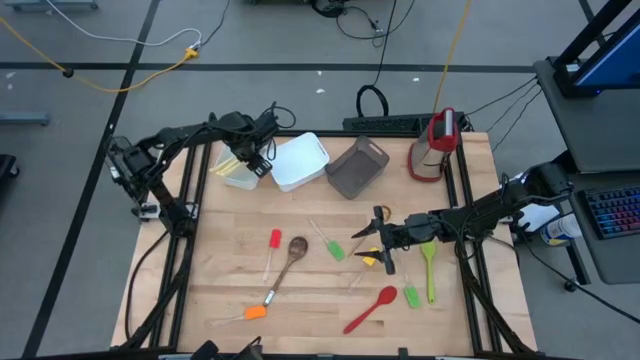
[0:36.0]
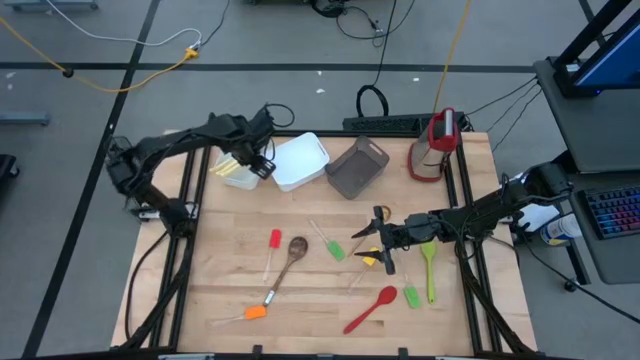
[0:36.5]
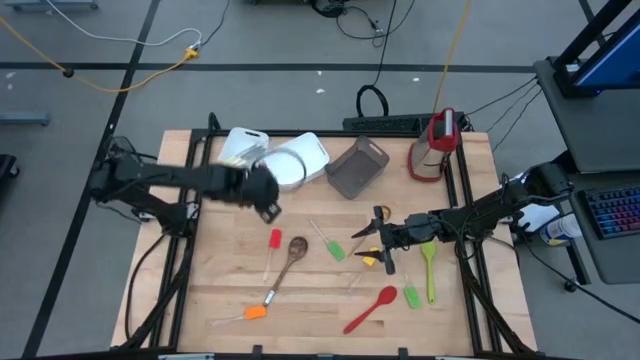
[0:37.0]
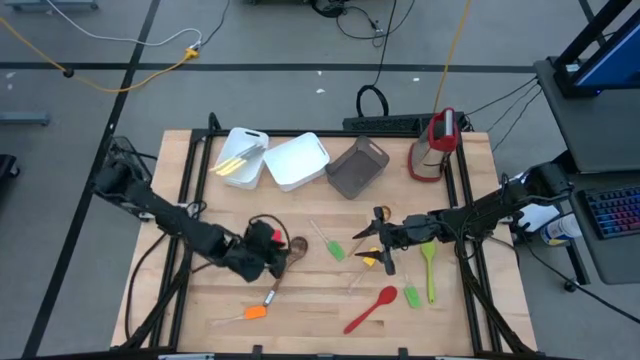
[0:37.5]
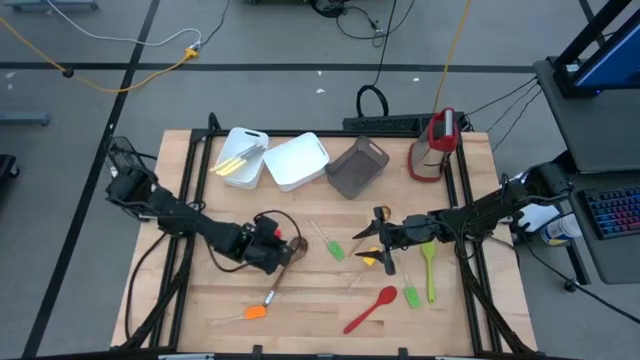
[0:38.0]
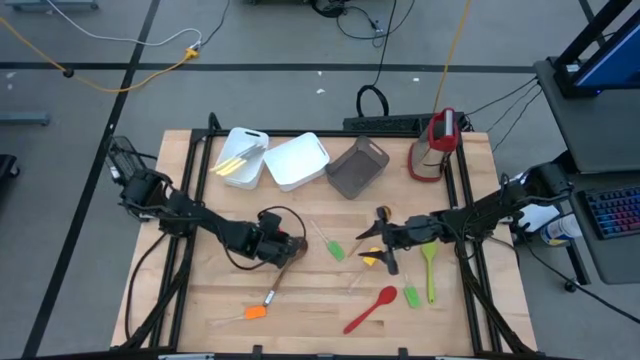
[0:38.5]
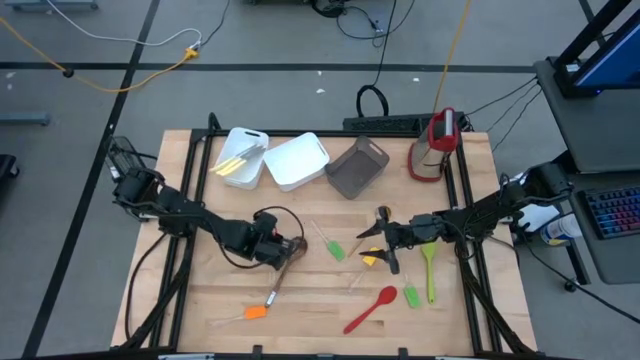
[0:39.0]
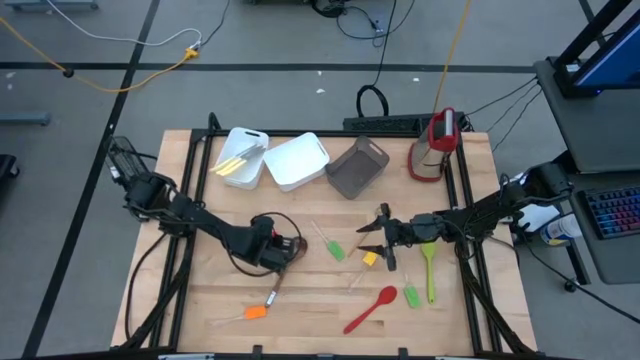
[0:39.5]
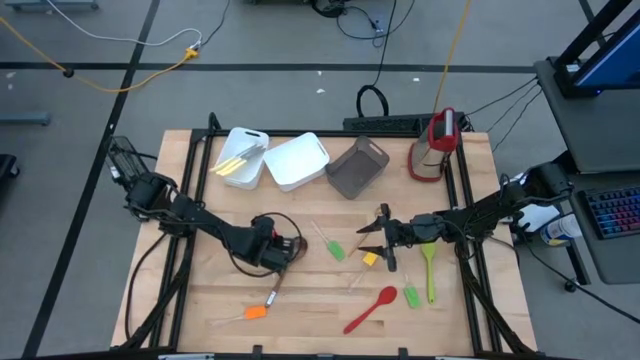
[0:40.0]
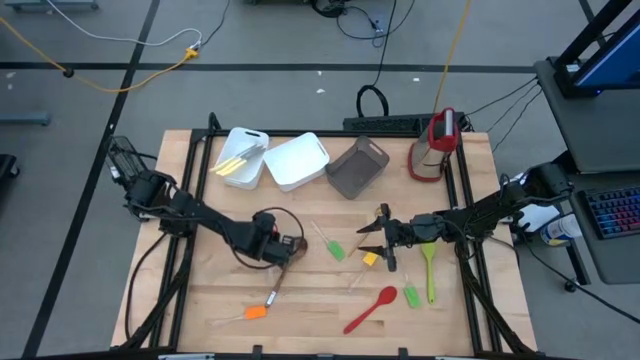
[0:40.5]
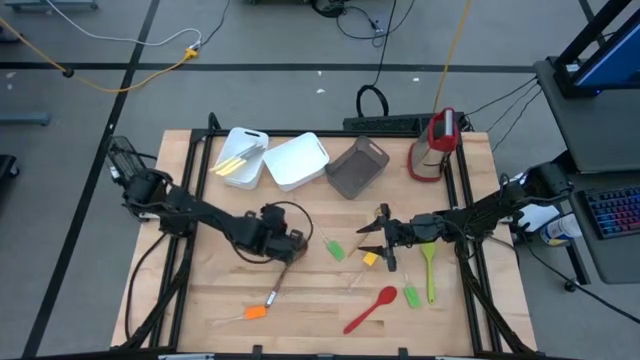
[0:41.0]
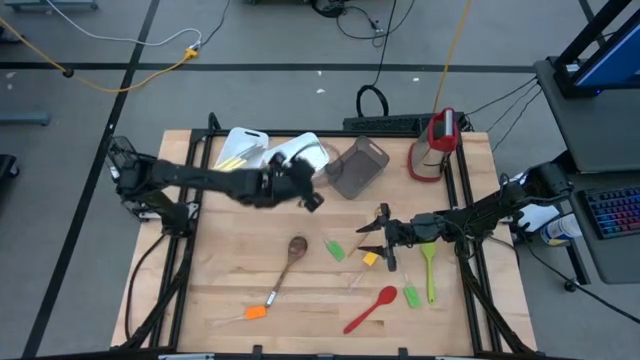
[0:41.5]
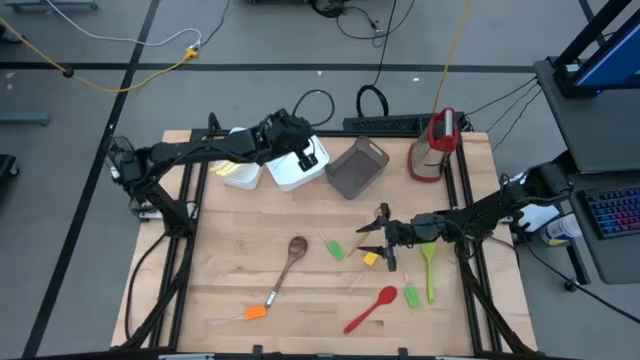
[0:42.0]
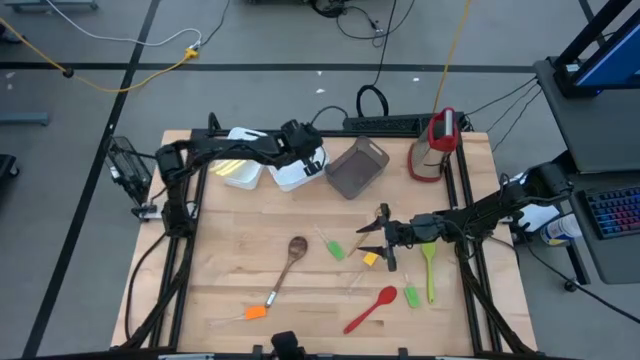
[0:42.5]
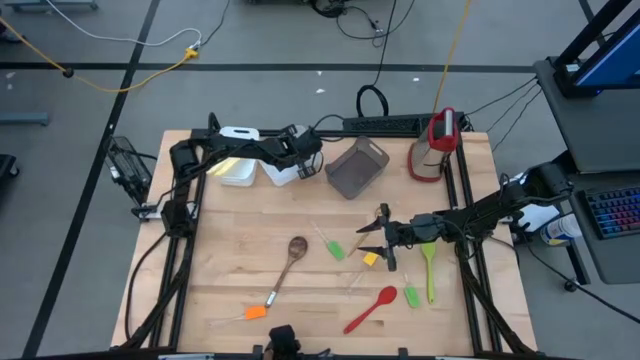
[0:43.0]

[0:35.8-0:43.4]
Task: Pick & Place Kitchen Items
Put the red spatula into the right white bin

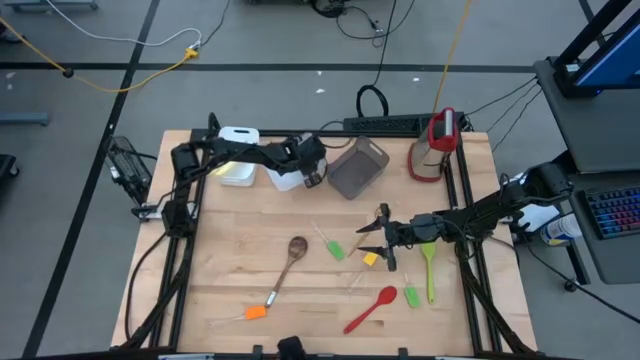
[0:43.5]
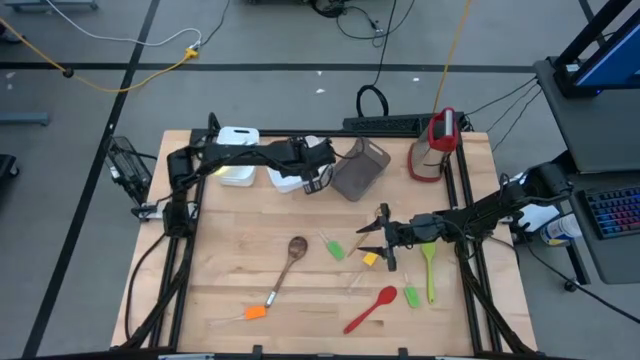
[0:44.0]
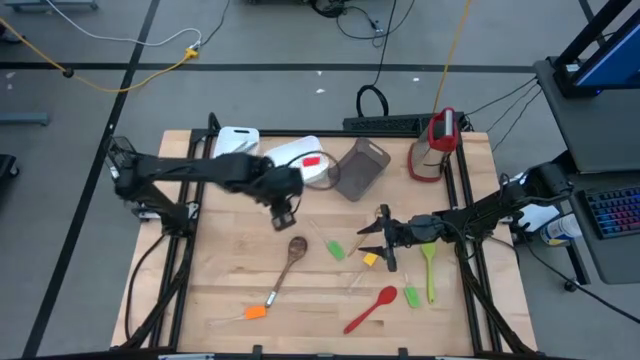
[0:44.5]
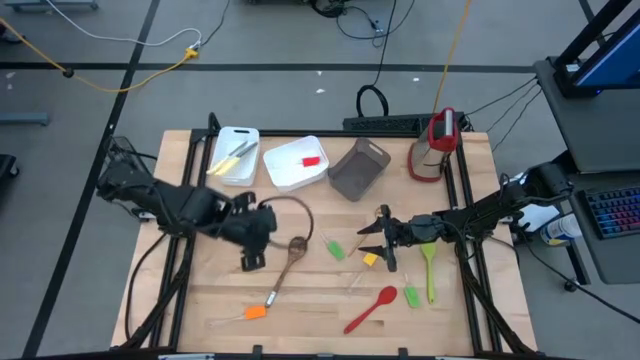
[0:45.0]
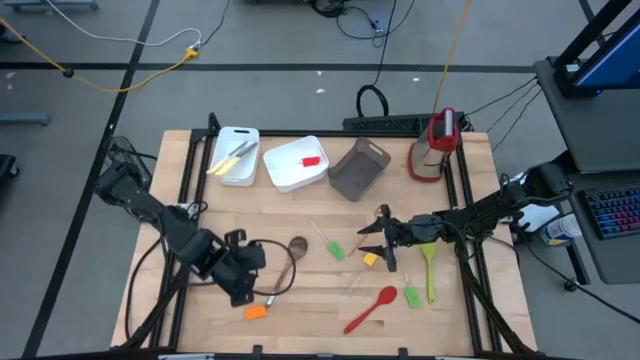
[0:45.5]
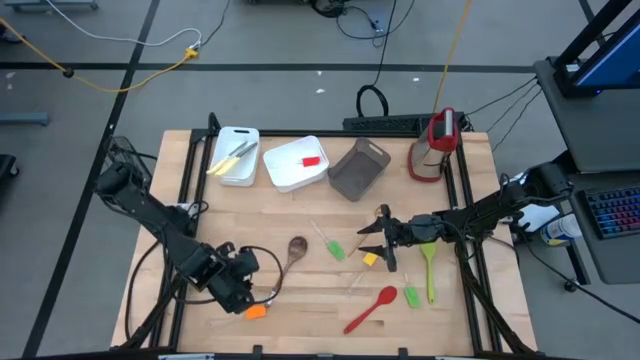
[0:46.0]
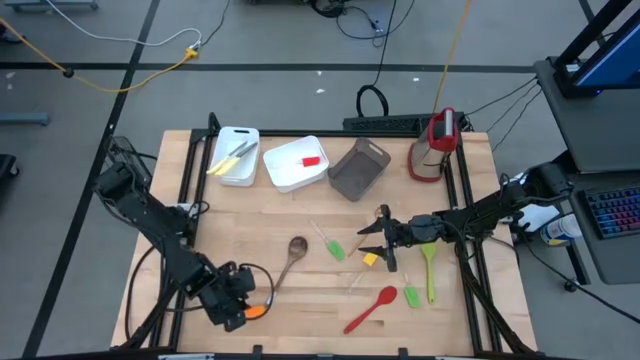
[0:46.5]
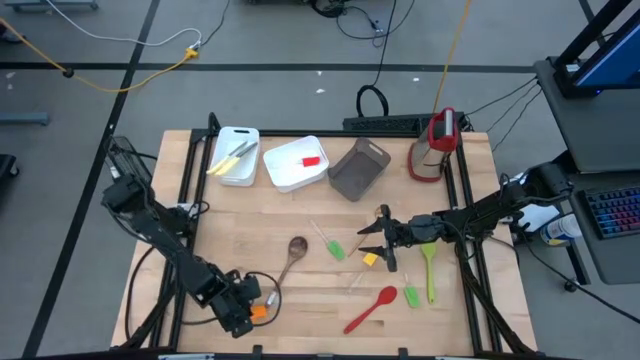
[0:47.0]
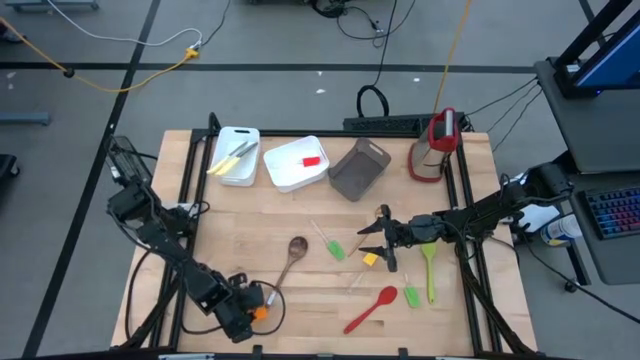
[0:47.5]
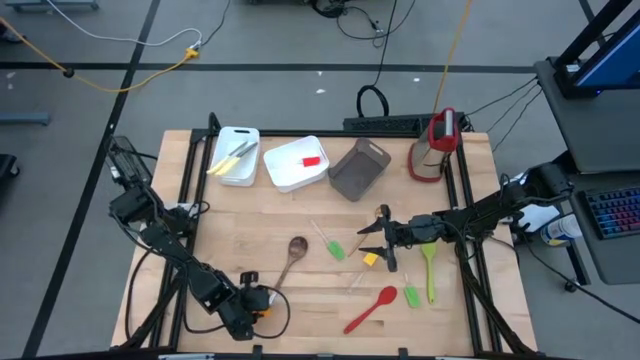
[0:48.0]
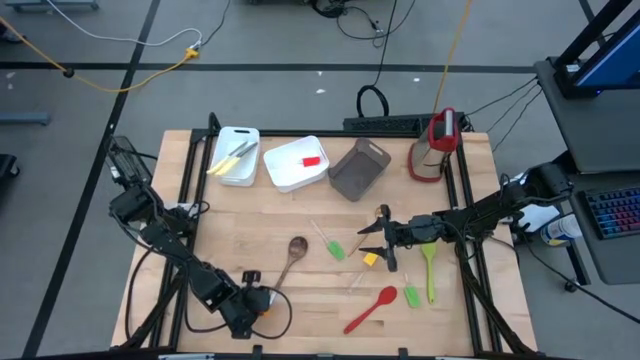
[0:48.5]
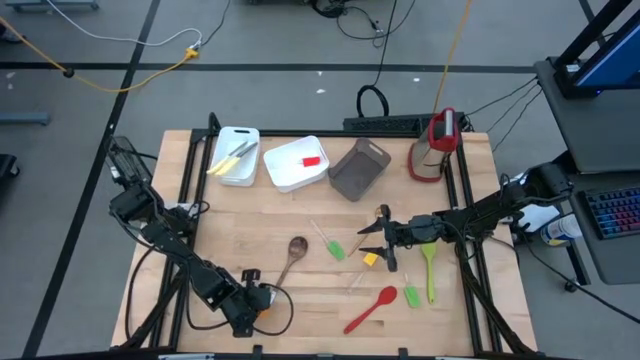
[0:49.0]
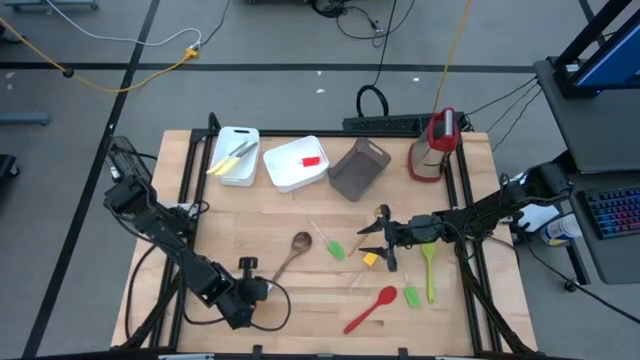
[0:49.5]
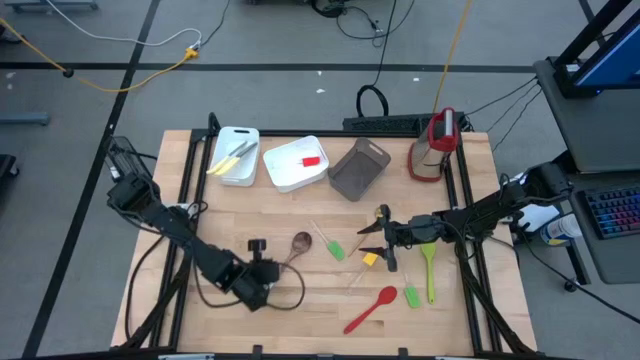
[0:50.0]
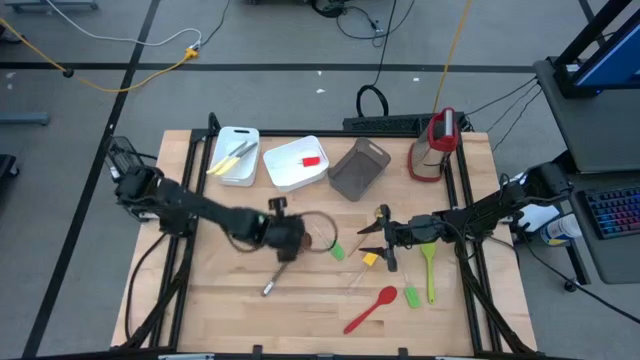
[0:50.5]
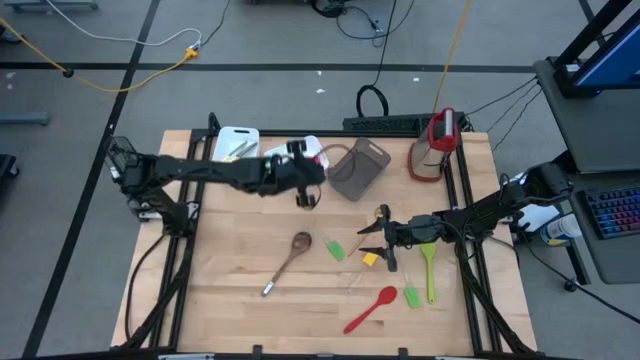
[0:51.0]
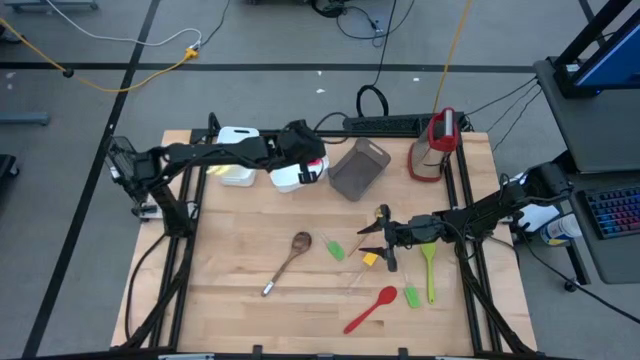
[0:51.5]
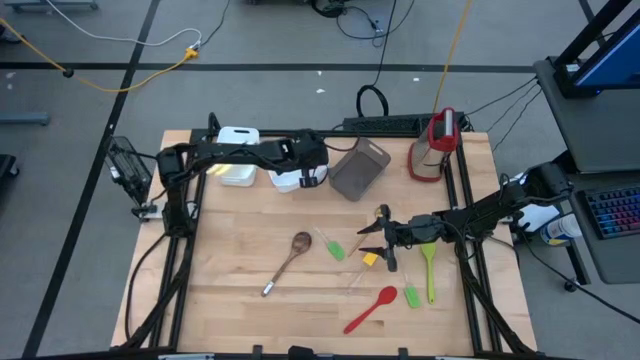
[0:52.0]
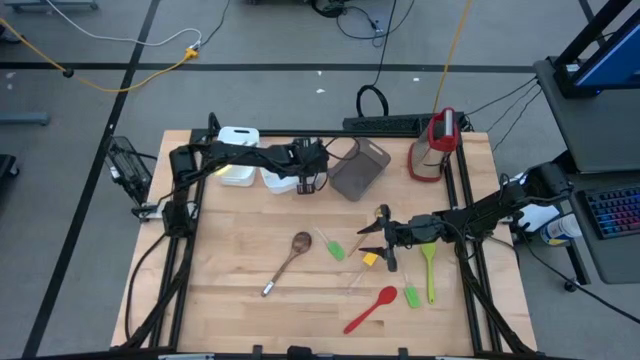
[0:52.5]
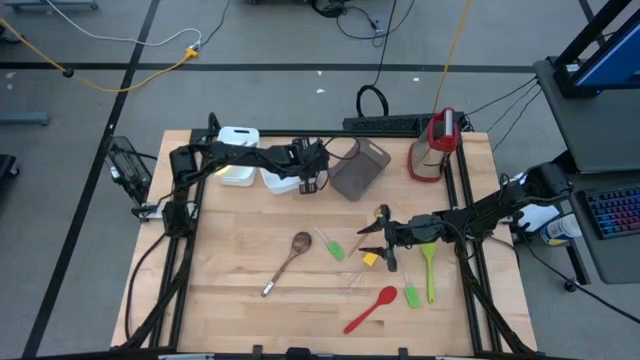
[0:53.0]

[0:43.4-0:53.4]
Put the orange spatula into the right white bin

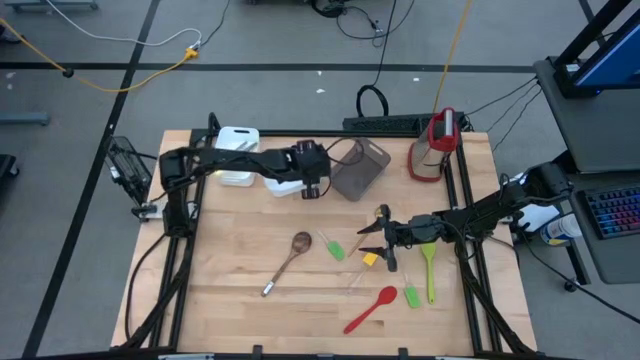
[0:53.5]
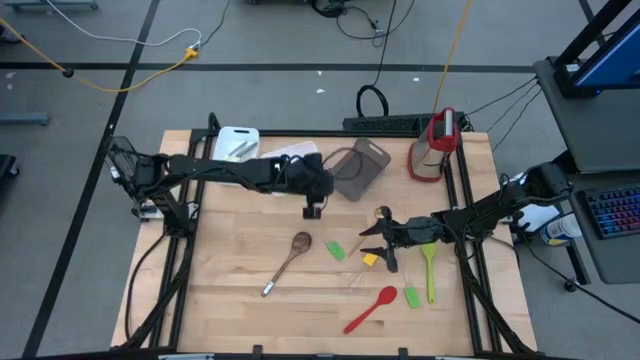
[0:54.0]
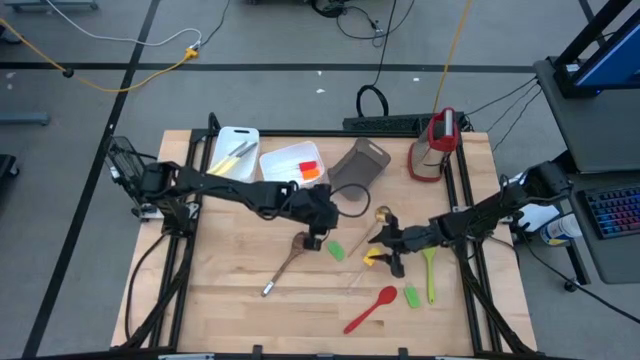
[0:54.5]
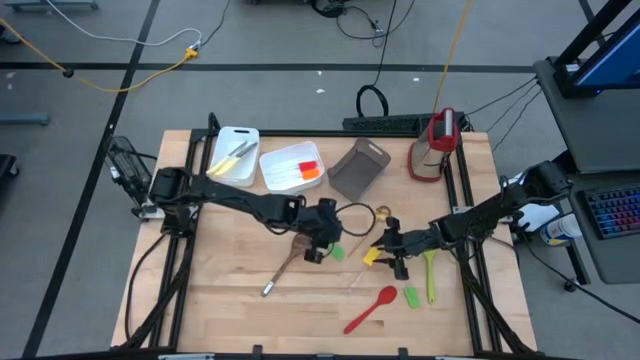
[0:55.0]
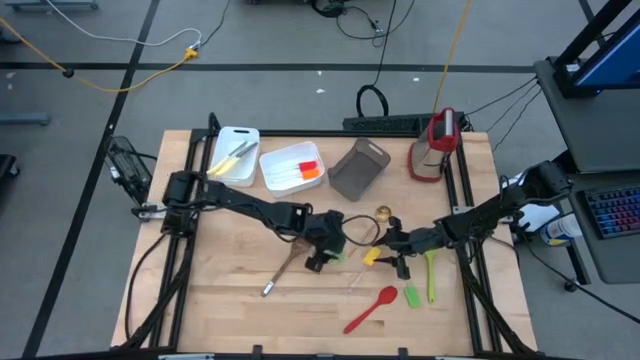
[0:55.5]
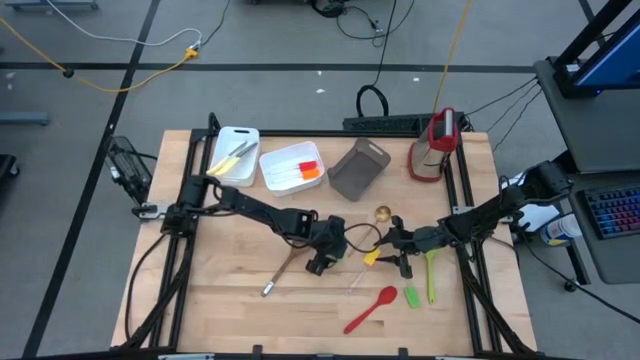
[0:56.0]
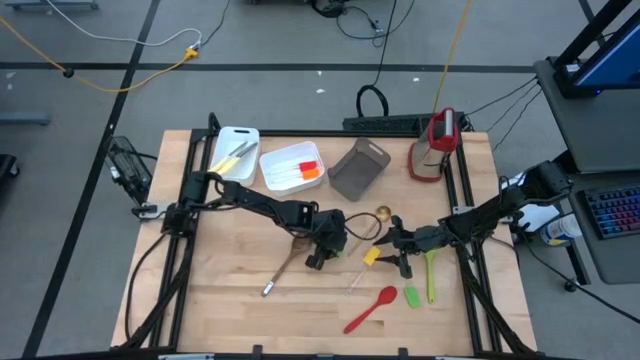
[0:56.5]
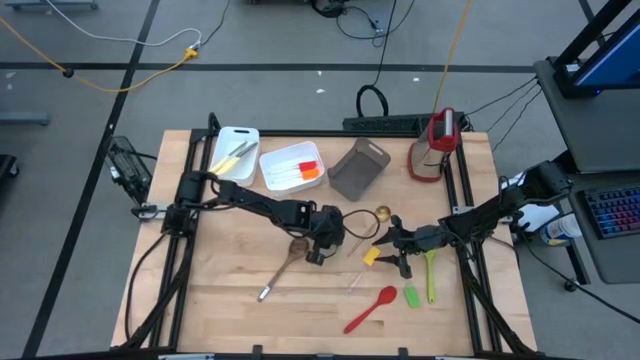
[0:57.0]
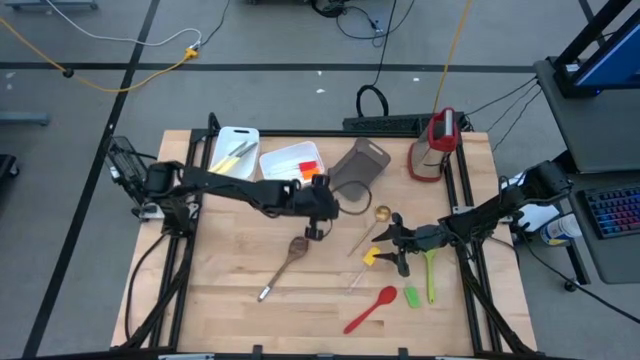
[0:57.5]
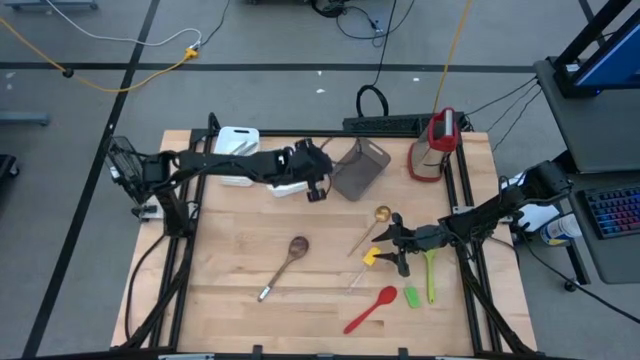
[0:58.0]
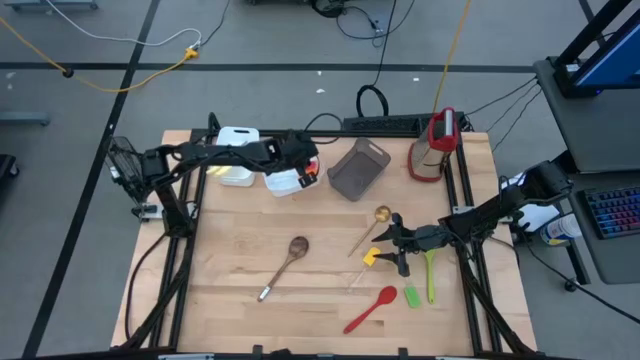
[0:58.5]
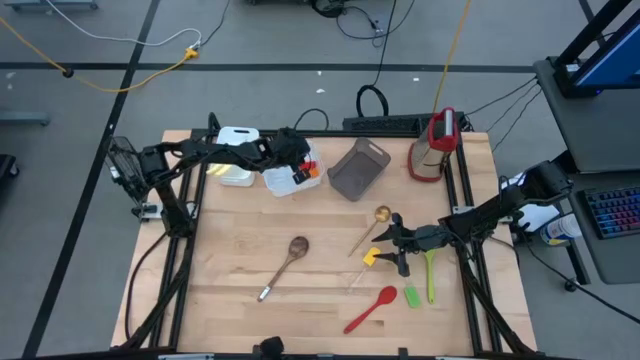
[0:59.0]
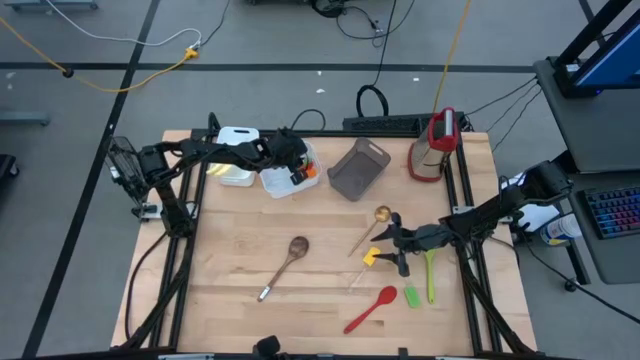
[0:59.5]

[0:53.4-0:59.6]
Put the left green spatula into the right white bin
